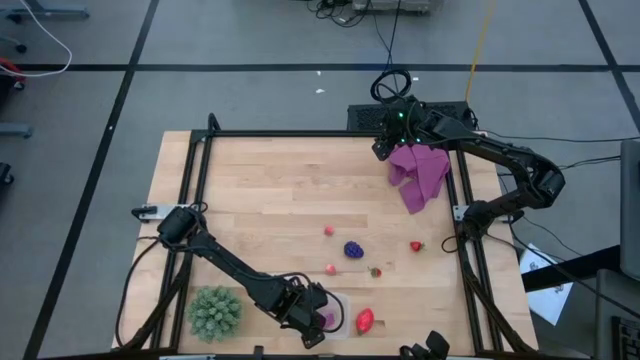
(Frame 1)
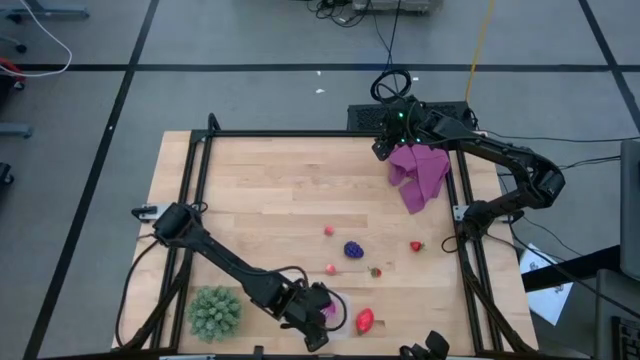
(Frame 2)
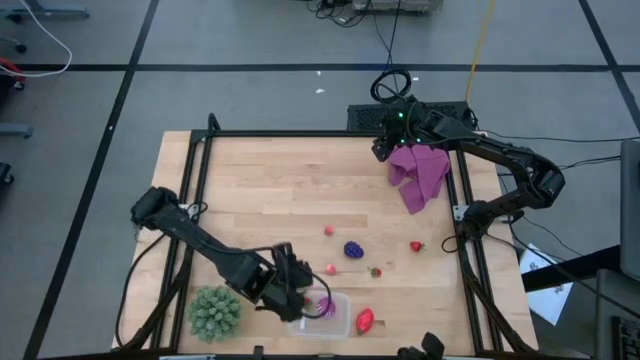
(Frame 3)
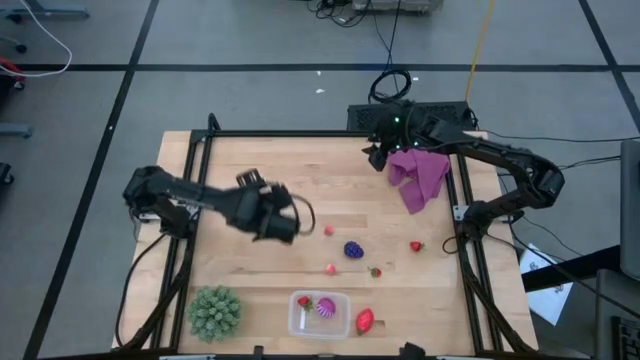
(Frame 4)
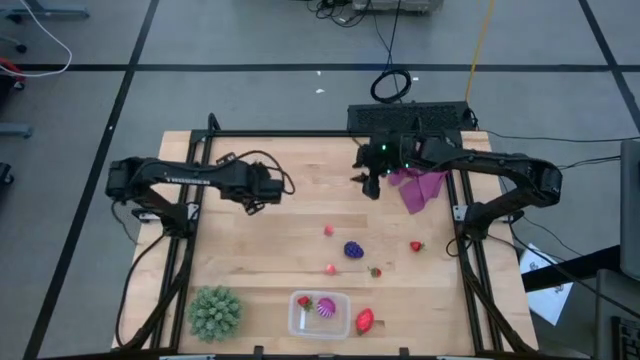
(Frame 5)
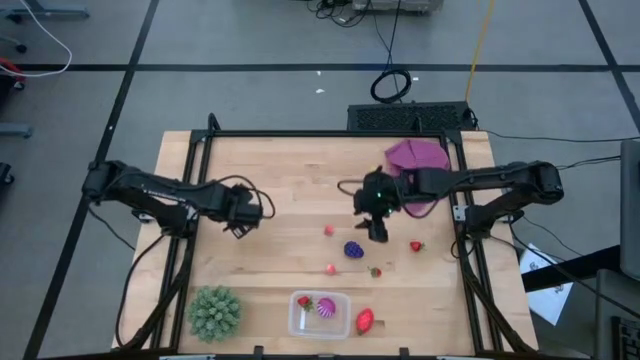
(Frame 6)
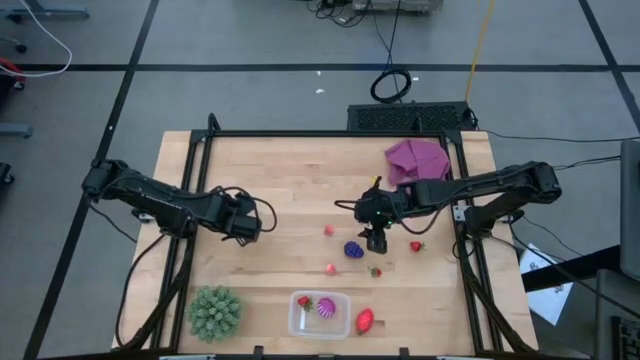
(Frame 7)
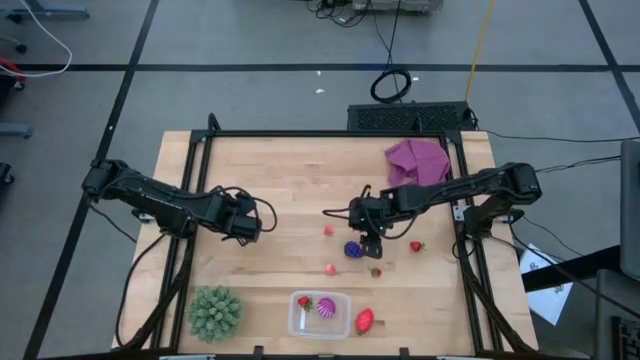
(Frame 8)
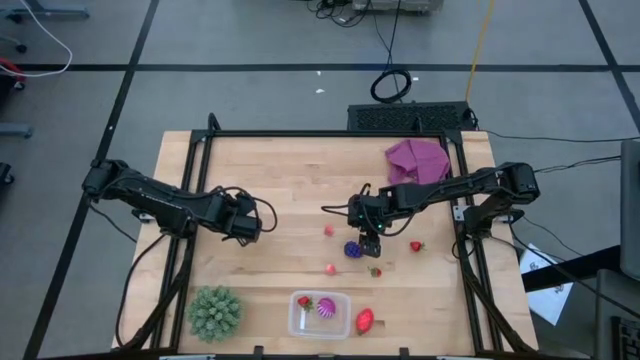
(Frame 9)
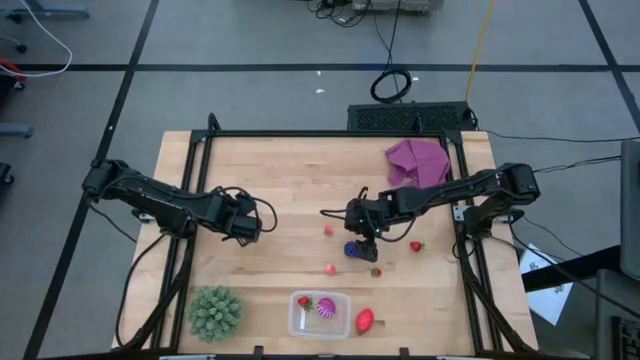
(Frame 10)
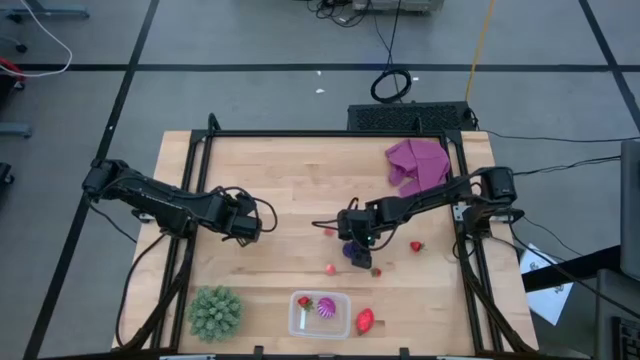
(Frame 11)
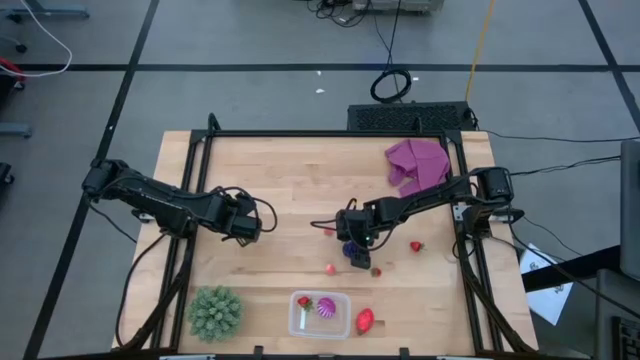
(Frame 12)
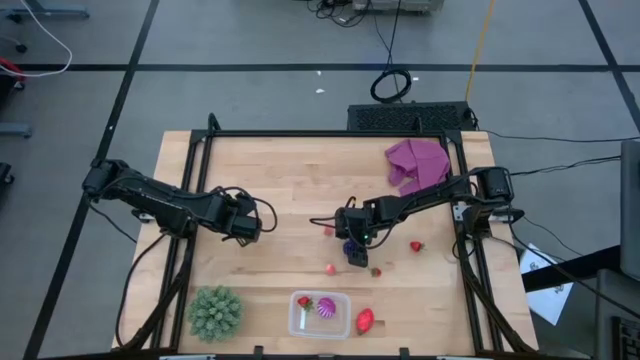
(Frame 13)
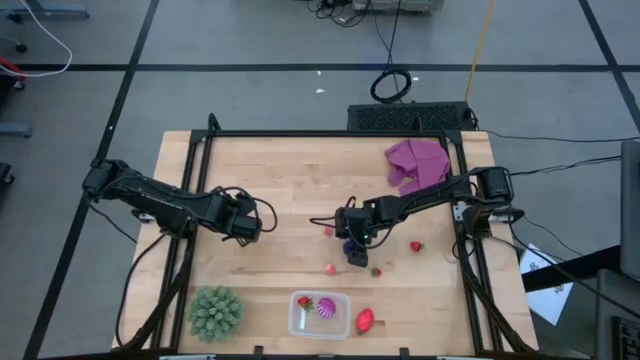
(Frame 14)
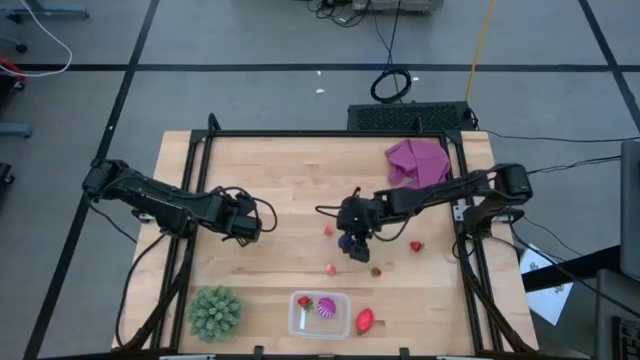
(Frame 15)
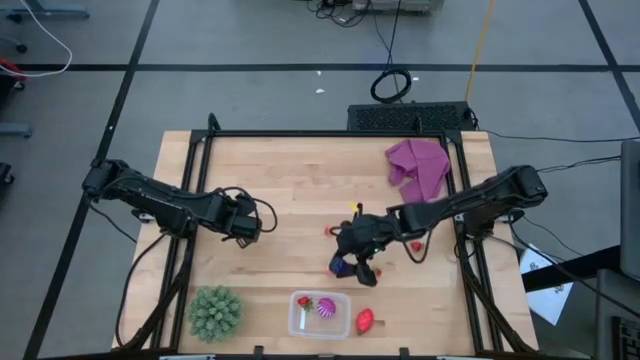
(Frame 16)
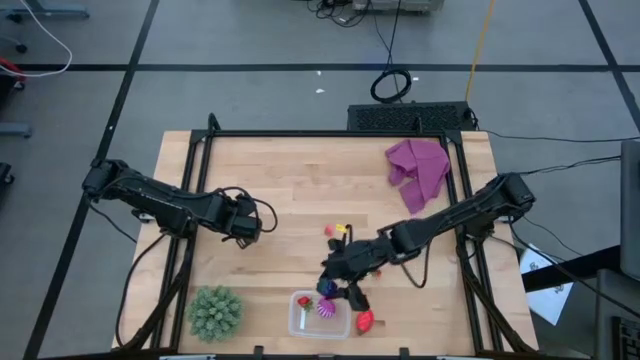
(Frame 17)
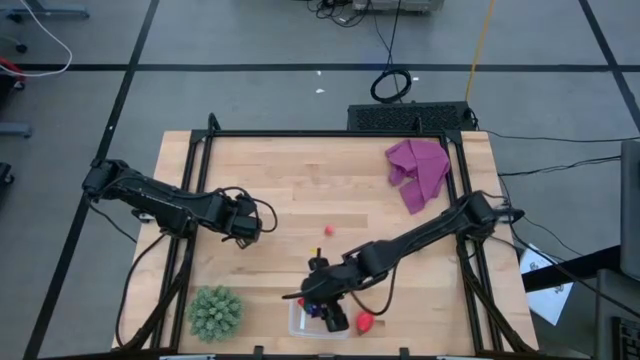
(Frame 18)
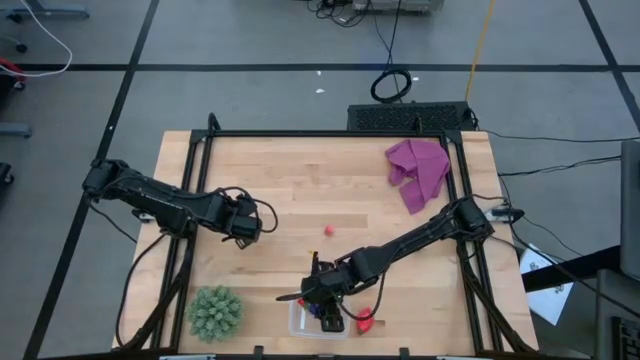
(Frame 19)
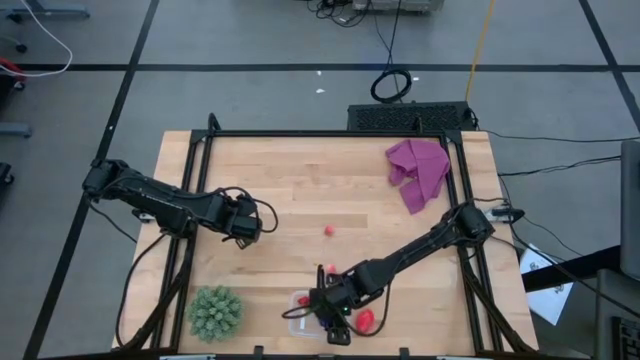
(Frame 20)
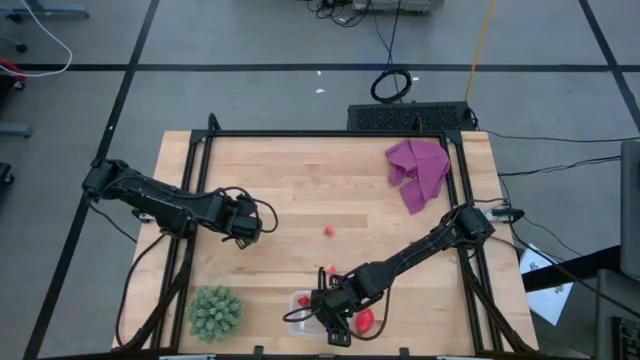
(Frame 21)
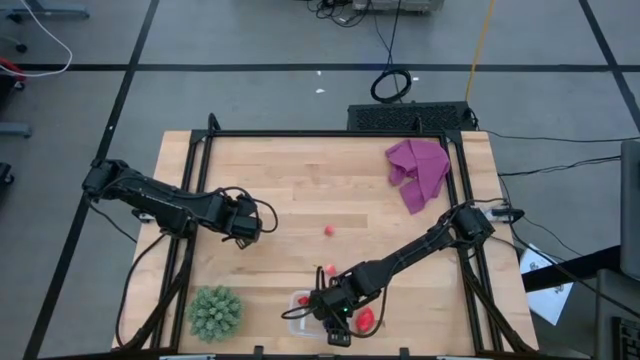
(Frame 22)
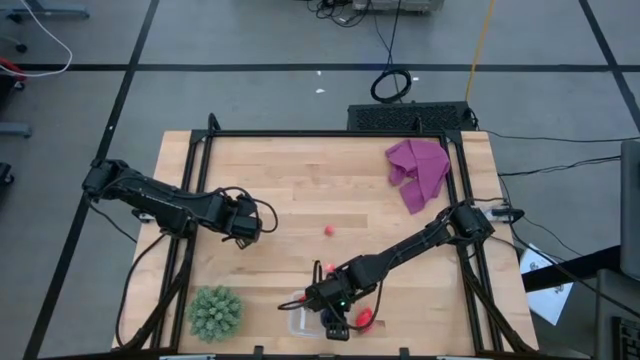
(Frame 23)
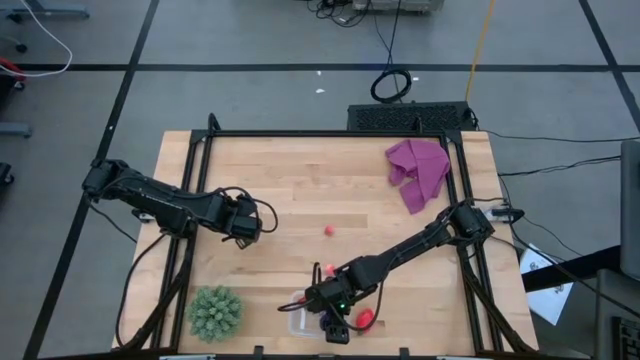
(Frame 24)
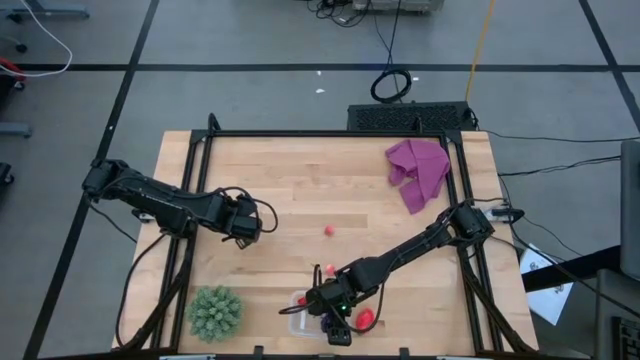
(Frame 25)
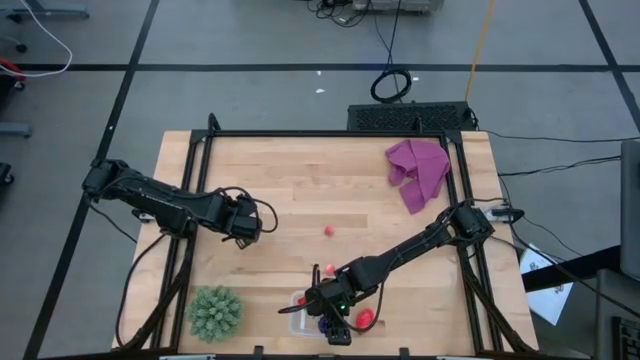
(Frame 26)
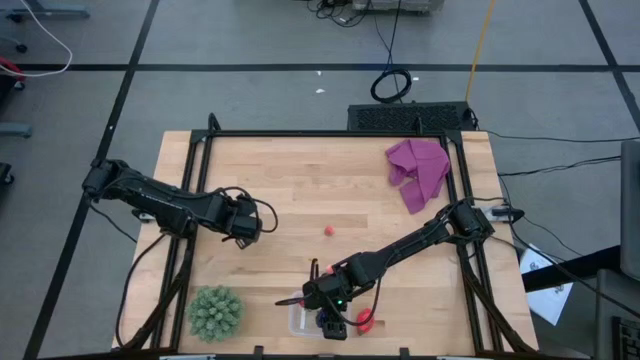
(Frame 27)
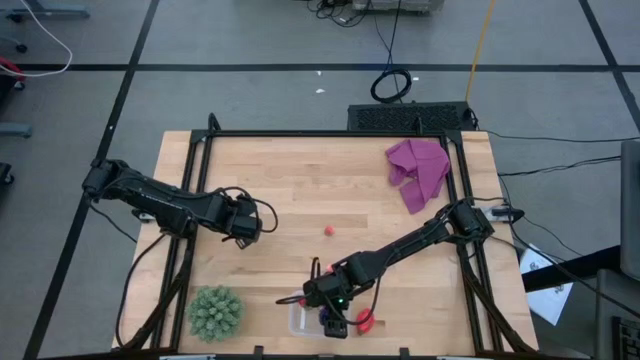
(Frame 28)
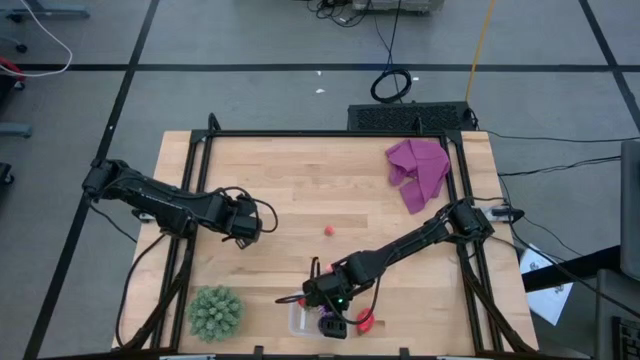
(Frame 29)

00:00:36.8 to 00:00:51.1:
Task: Pick and placing Produce into tupperware
Put the grapes into the transparent bin

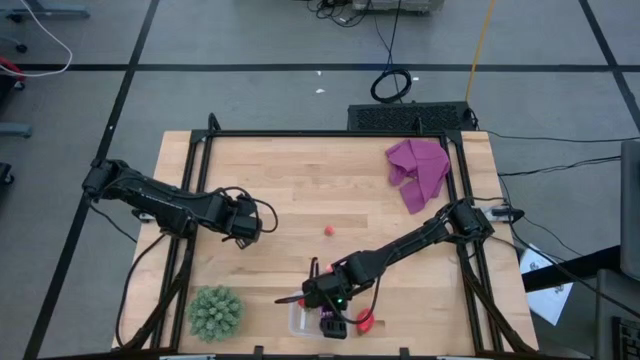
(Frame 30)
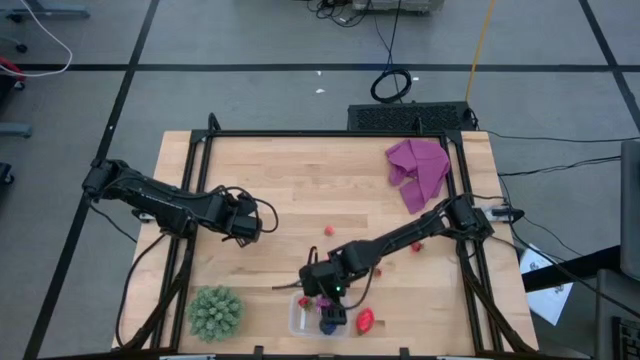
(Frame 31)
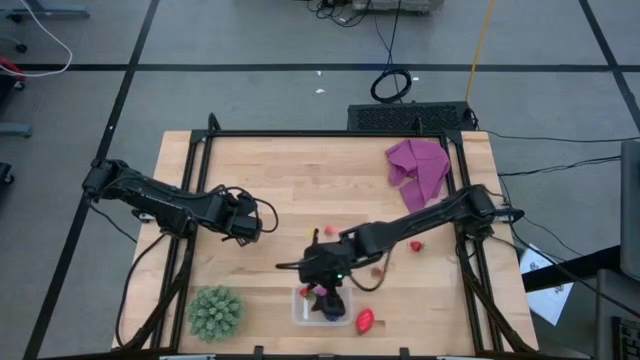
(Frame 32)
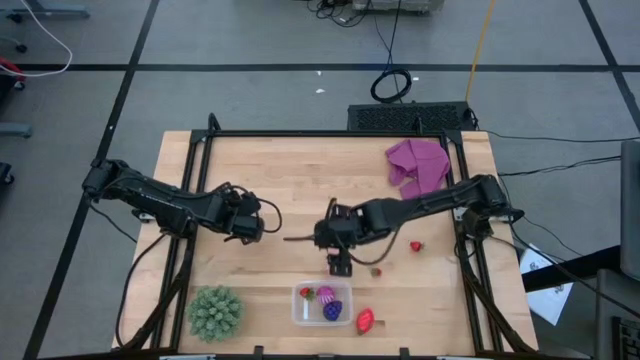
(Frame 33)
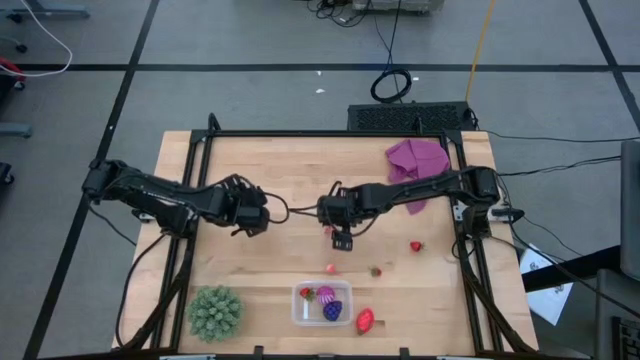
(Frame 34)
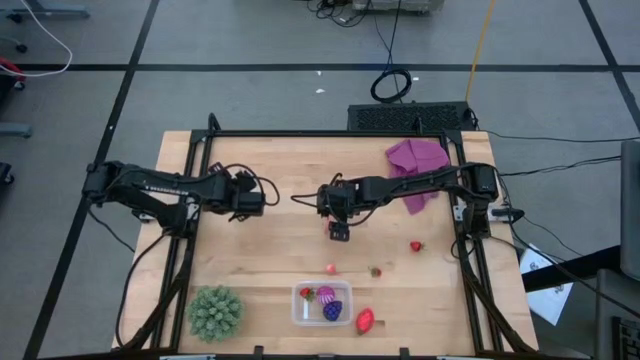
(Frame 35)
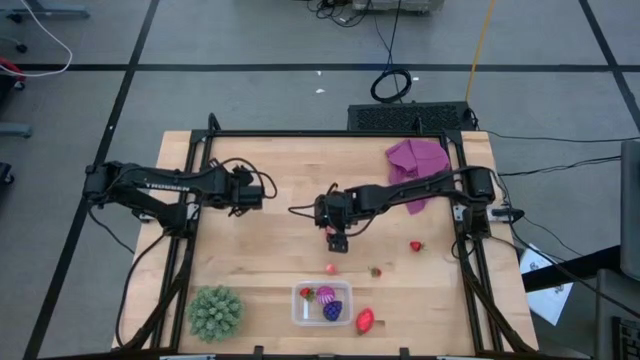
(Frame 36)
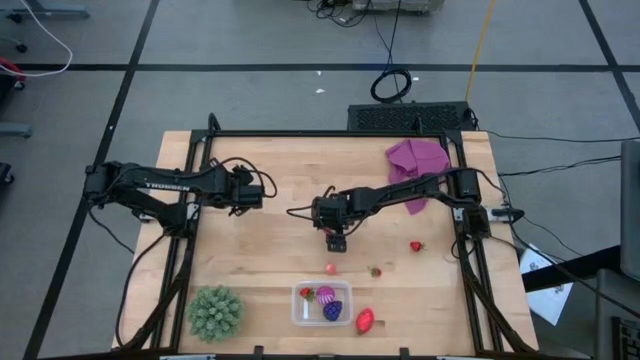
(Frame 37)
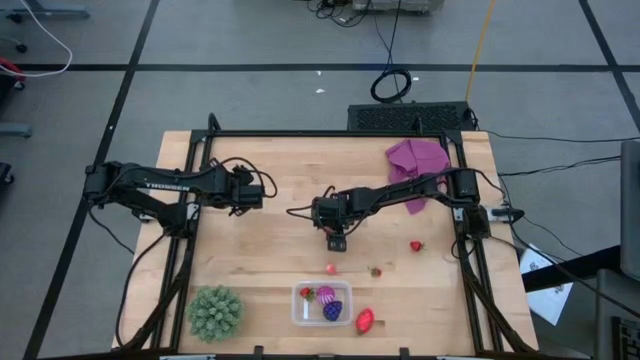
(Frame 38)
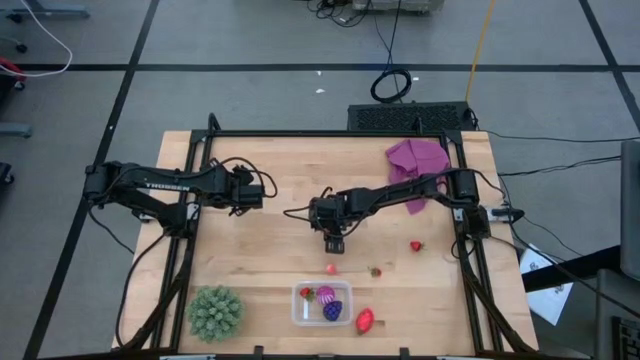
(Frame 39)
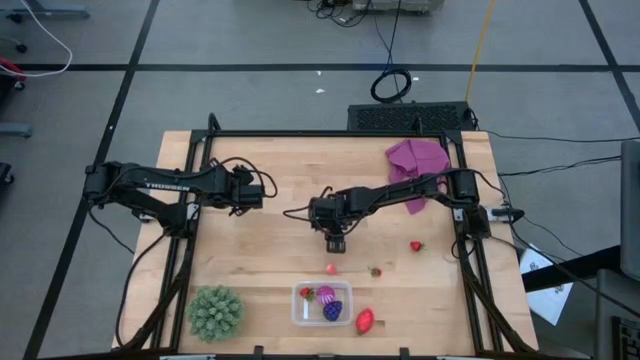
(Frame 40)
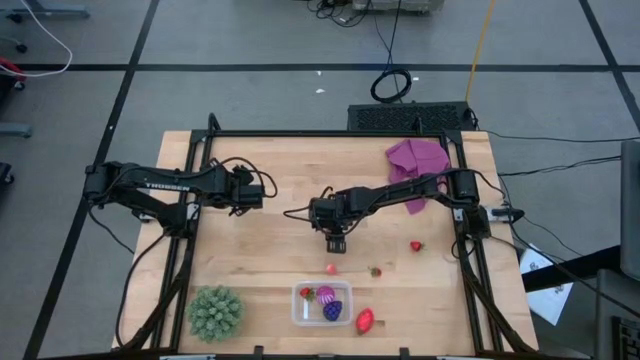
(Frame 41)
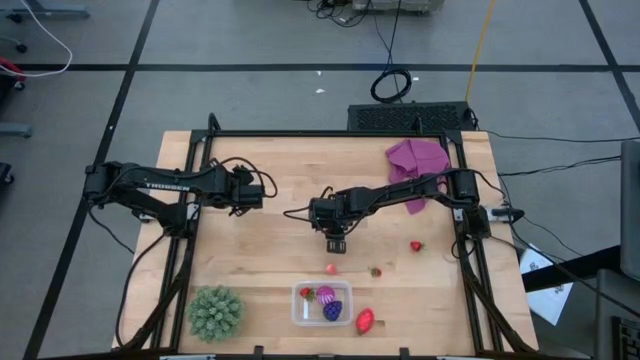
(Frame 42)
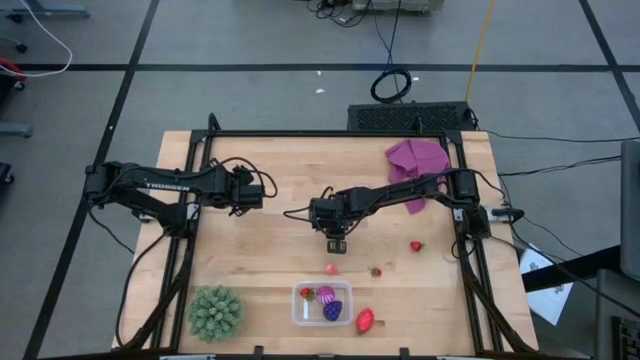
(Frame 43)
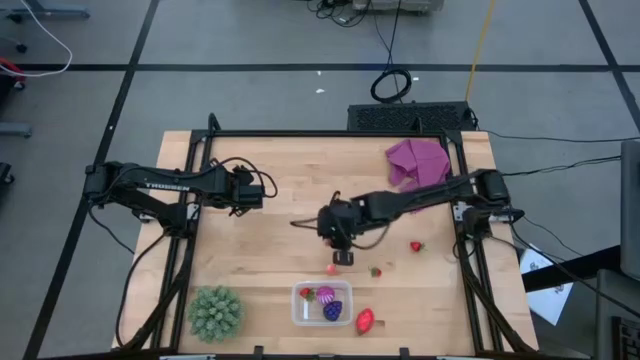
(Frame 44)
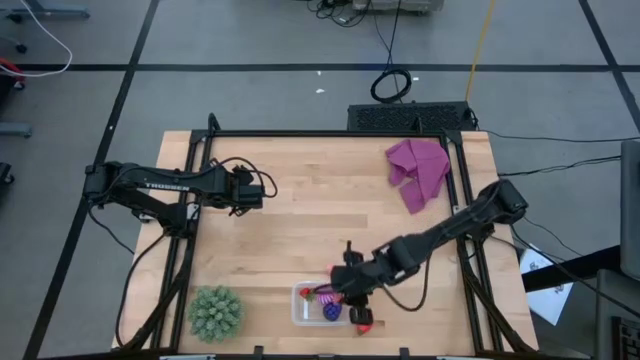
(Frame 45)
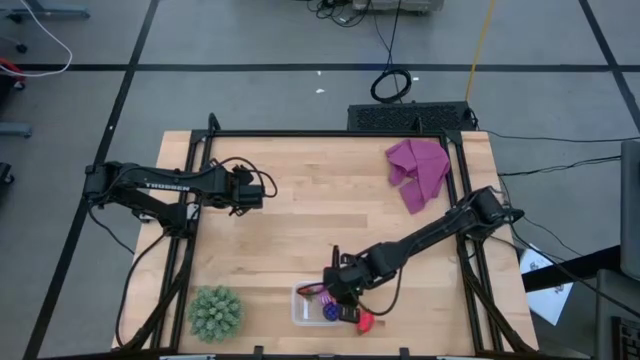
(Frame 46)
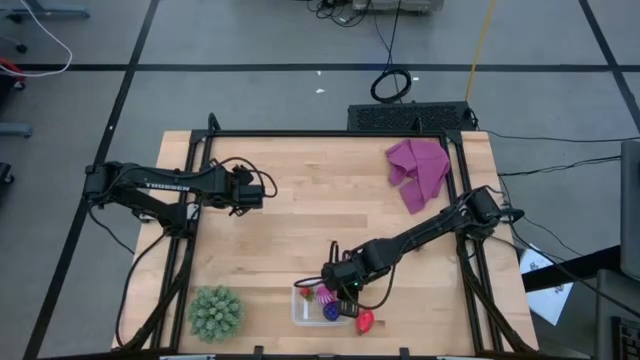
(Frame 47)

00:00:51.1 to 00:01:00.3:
Put the top peach into the transparent bin
